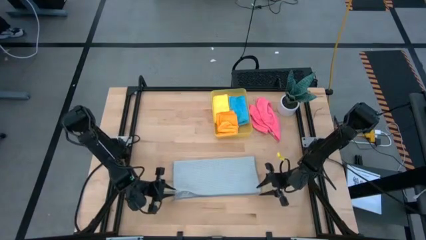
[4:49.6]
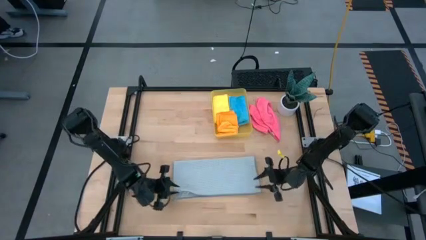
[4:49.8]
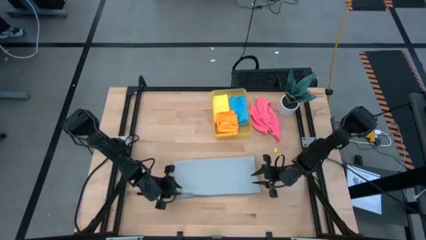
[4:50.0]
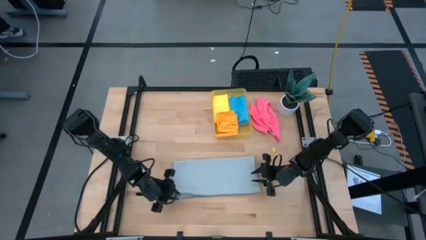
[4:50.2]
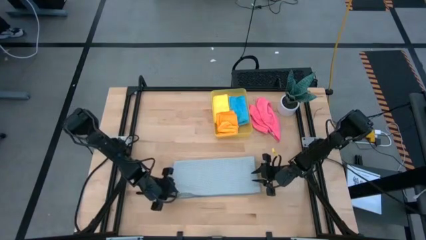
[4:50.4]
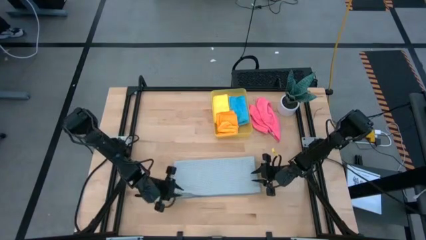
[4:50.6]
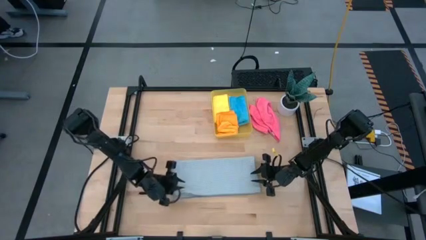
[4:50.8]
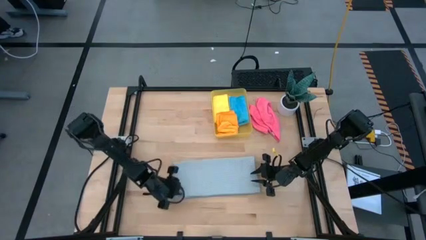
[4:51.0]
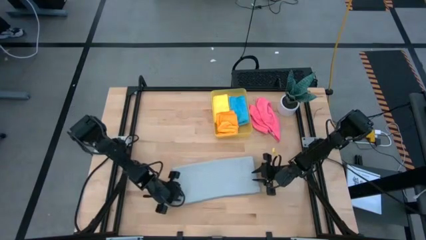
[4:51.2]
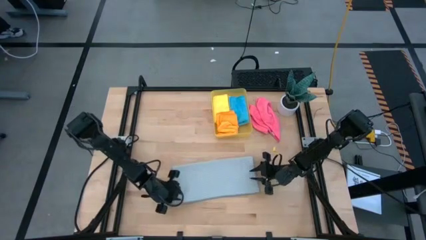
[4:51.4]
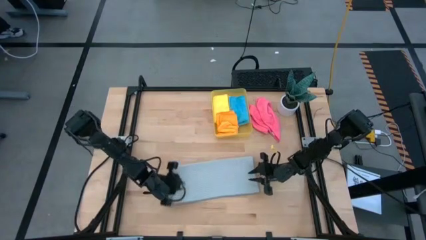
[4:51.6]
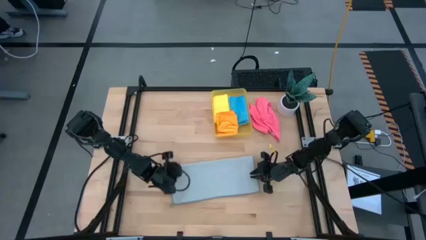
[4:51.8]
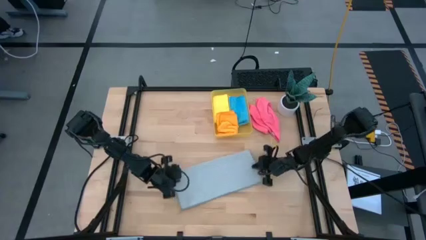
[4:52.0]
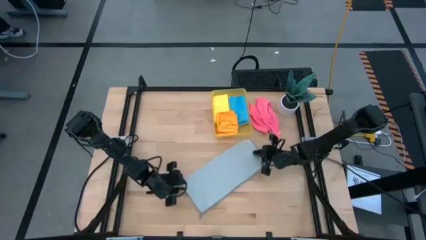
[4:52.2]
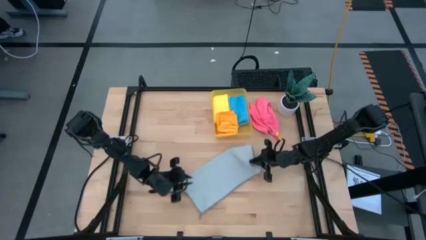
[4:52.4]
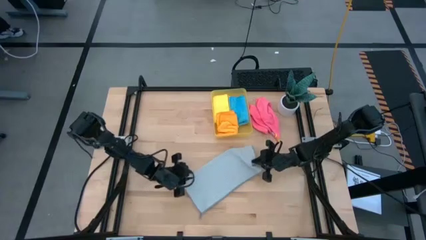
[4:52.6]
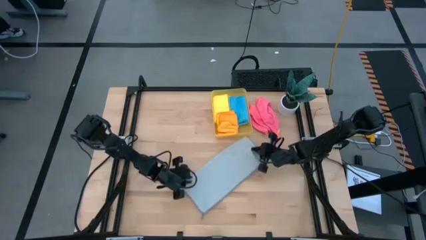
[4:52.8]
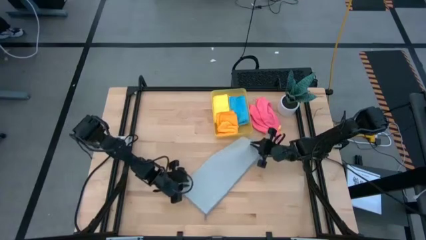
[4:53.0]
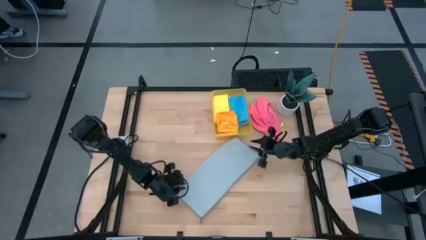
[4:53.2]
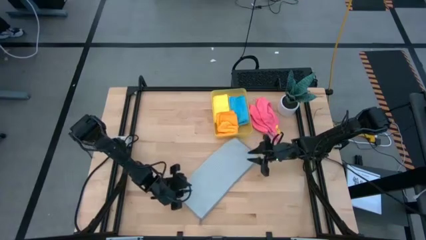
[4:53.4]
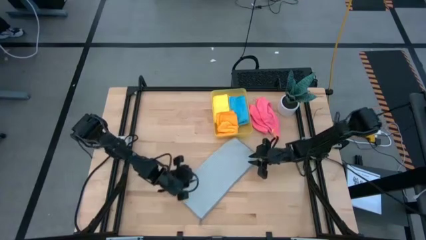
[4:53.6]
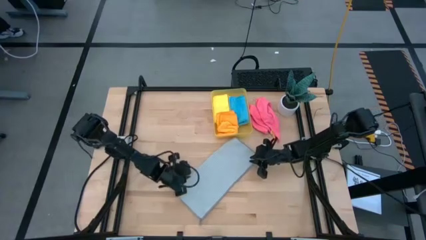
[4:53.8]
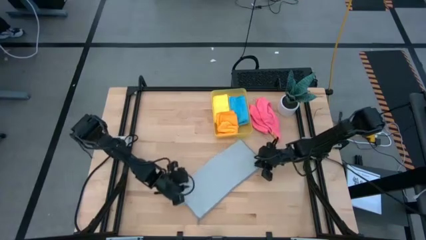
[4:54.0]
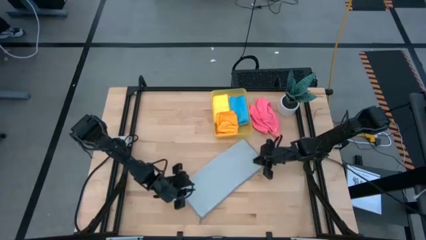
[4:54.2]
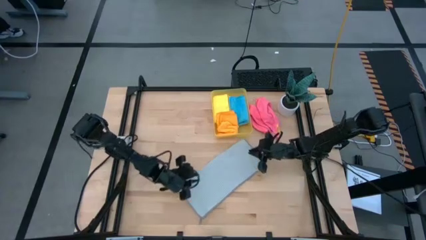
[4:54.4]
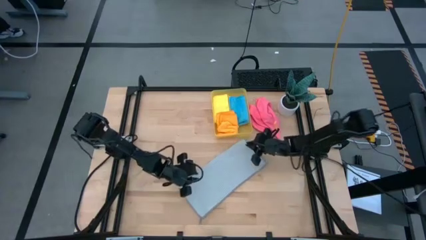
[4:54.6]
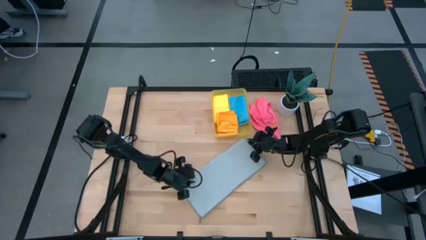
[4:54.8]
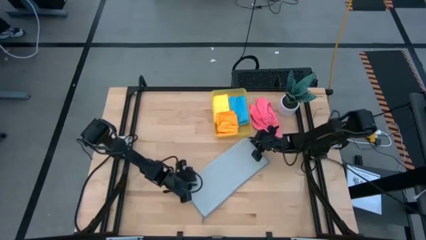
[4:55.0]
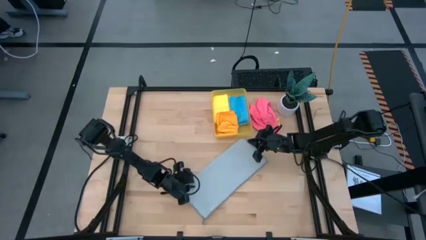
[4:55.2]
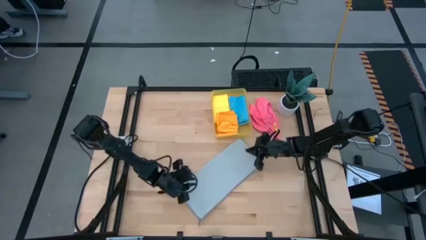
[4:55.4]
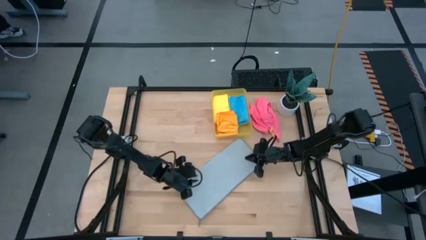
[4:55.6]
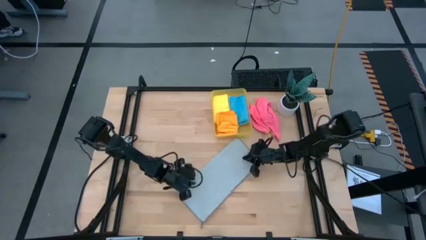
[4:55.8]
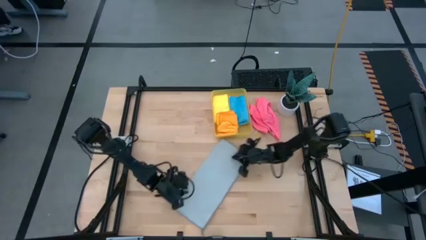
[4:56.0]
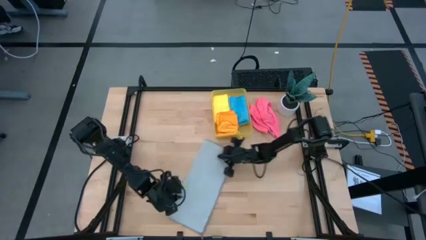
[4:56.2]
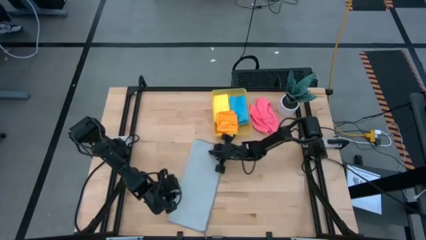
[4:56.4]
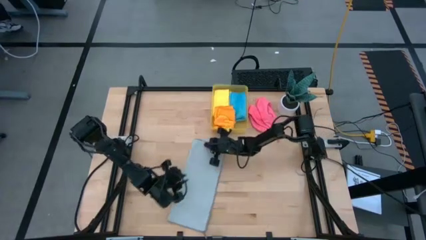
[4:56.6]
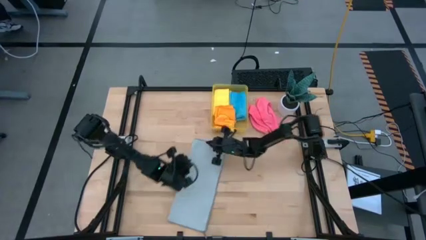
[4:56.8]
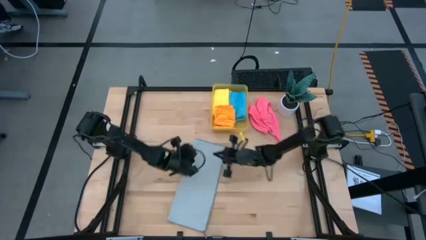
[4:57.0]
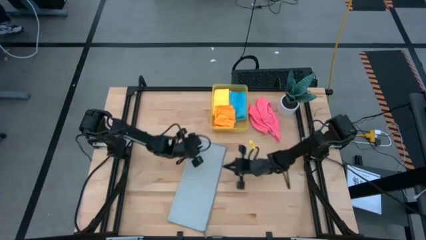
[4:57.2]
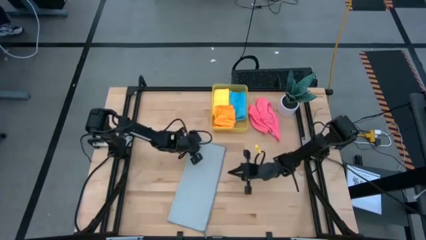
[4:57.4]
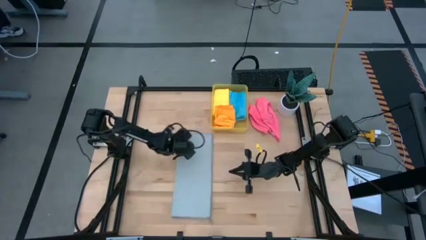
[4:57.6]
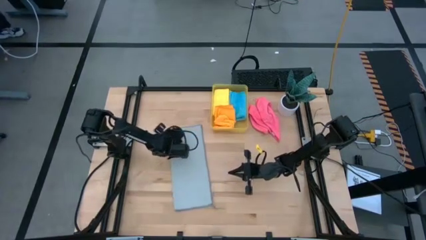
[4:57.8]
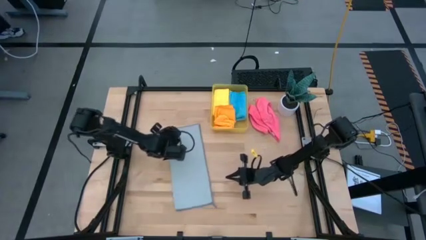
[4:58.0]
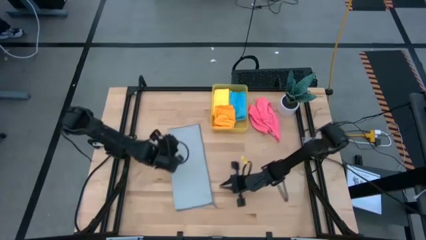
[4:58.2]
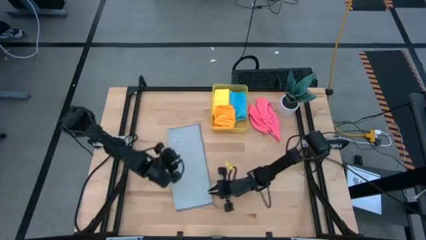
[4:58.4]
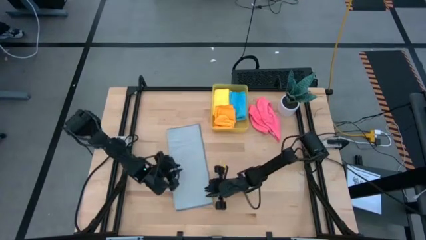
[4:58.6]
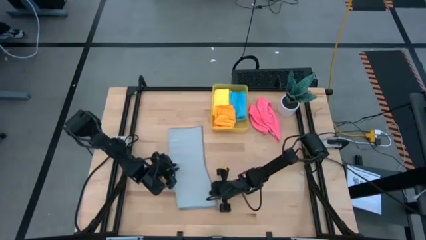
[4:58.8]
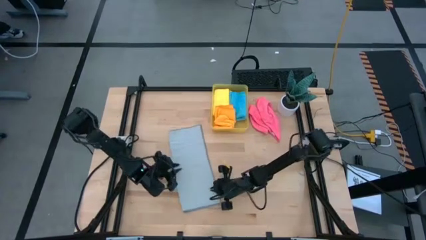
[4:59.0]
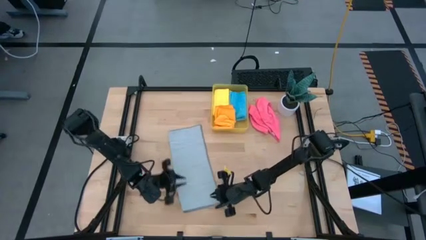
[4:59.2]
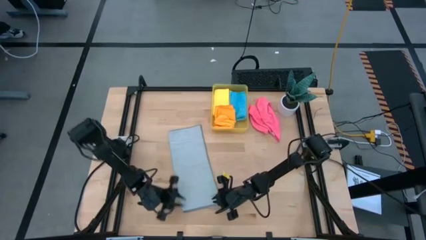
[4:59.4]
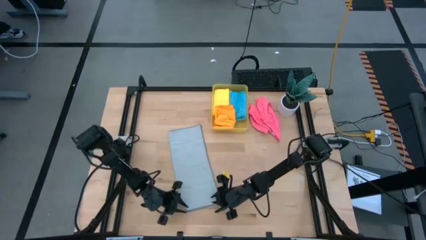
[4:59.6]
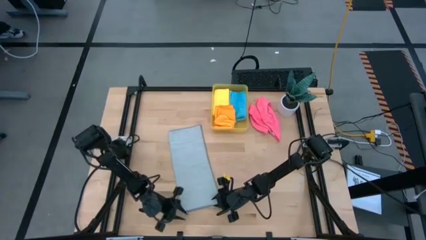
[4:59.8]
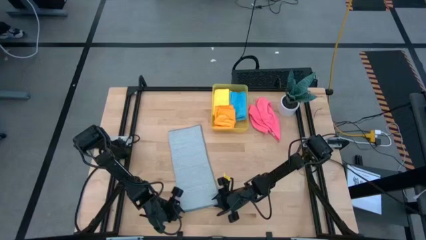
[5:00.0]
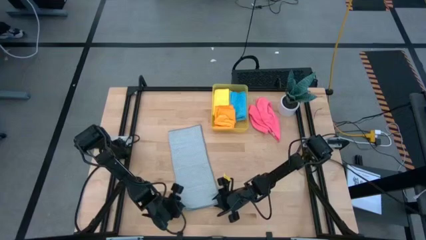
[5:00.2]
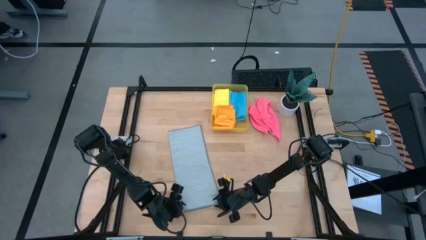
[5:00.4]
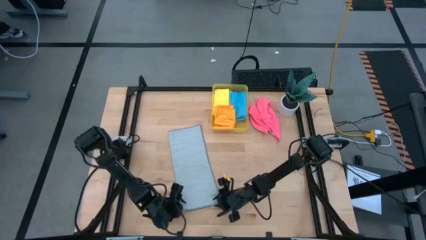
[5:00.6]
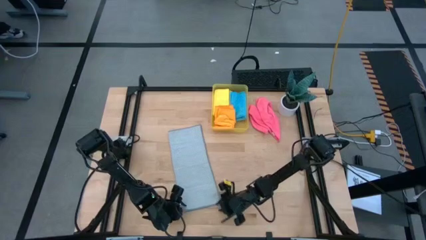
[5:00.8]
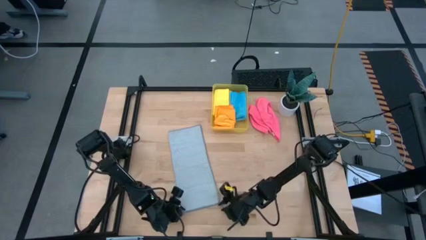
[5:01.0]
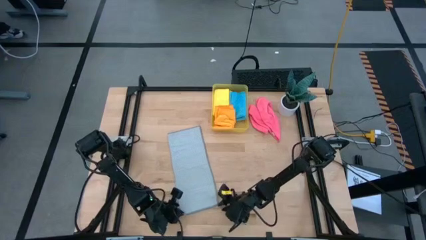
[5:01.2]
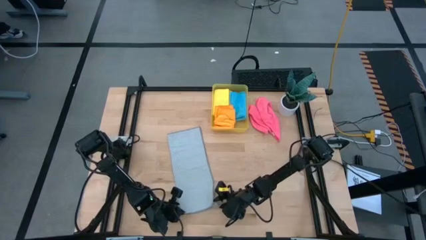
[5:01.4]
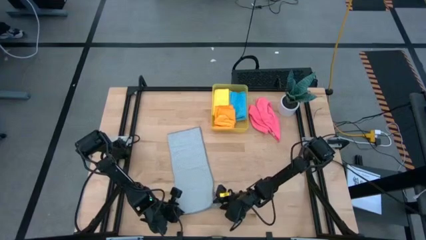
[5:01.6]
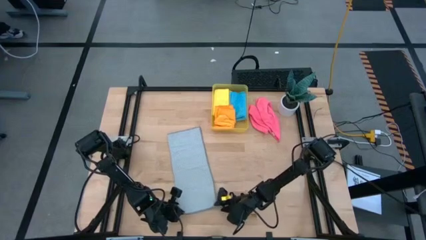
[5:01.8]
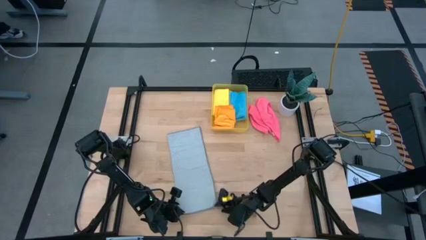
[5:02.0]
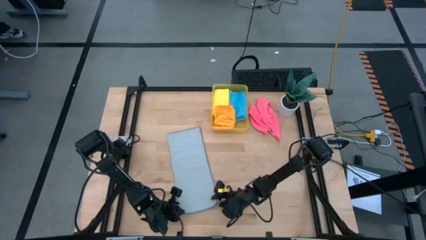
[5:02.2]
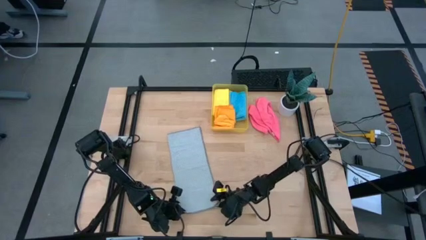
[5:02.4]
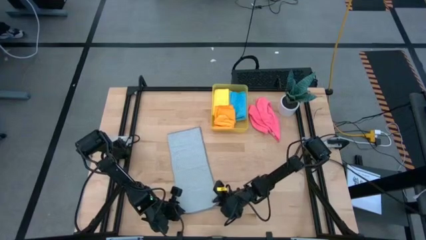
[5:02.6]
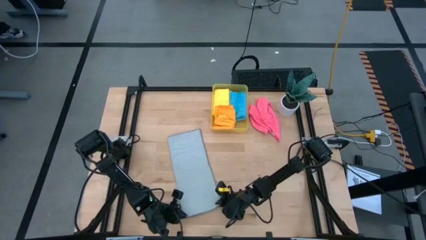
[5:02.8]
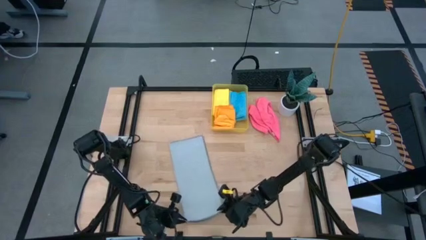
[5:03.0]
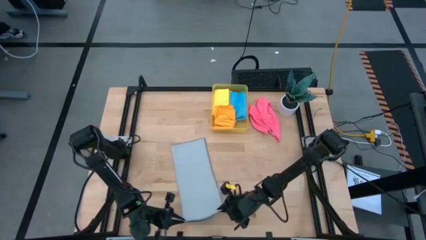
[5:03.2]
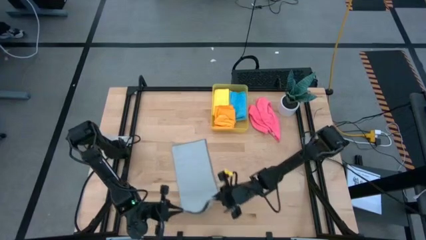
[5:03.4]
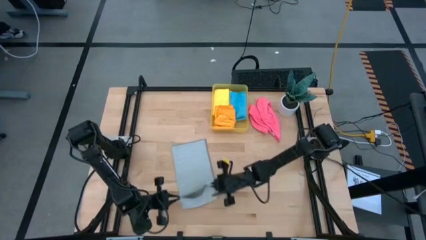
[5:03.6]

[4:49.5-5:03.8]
Task: Fold microfiber towels
Fold the gray microfiber towel

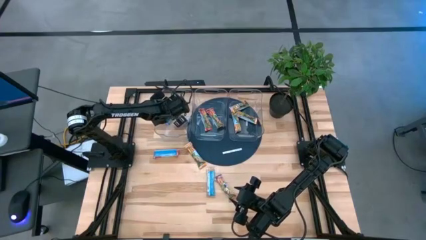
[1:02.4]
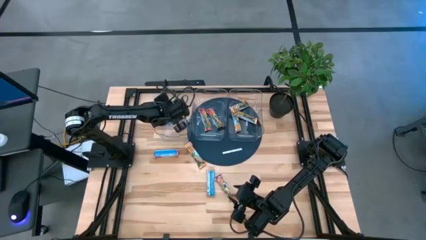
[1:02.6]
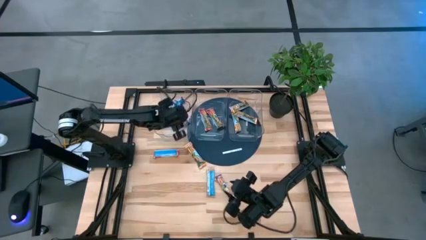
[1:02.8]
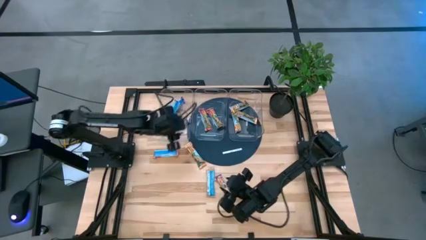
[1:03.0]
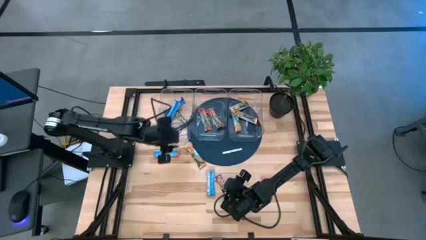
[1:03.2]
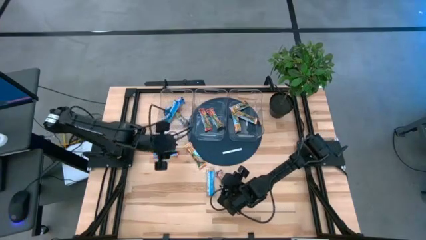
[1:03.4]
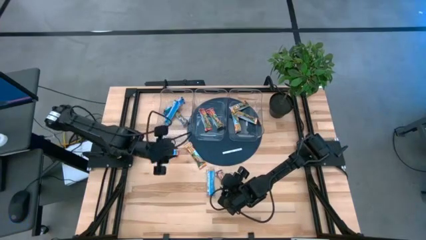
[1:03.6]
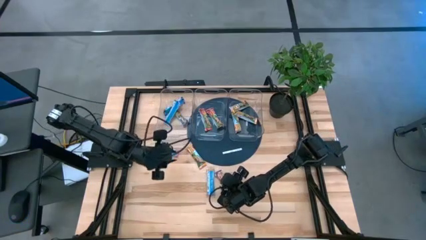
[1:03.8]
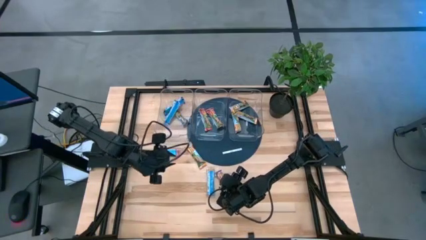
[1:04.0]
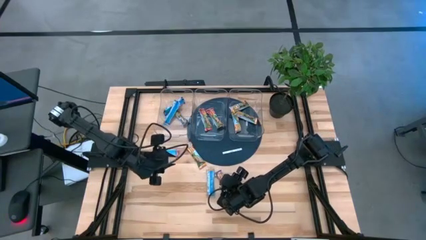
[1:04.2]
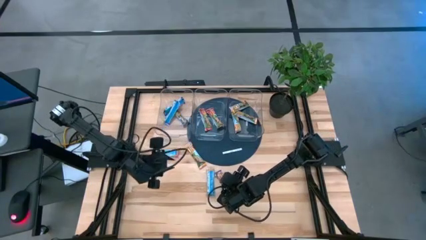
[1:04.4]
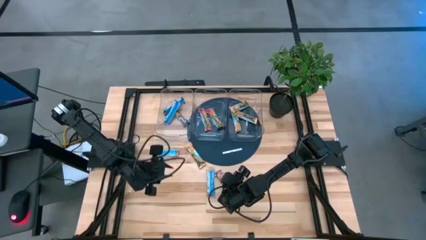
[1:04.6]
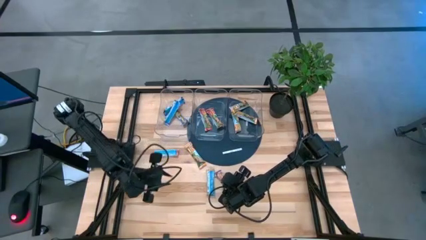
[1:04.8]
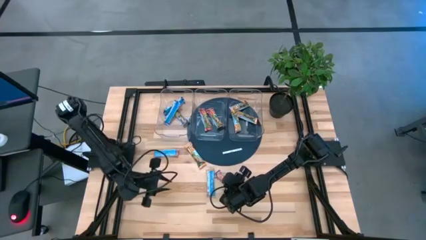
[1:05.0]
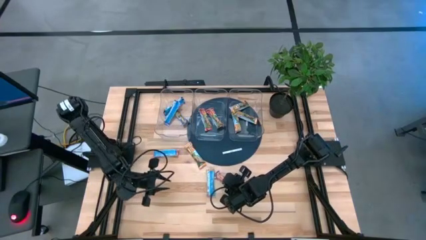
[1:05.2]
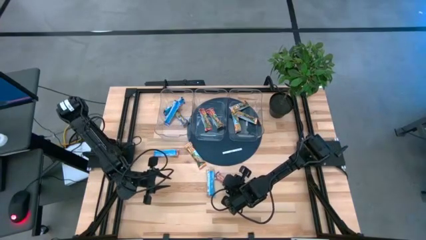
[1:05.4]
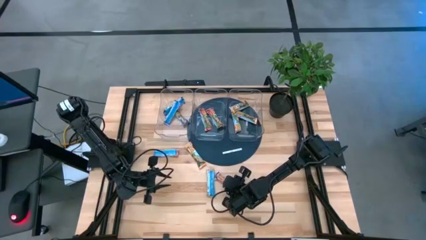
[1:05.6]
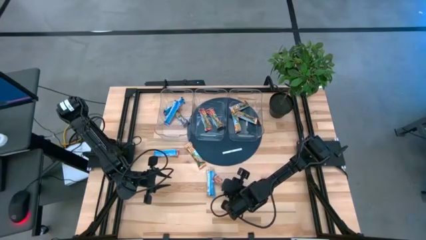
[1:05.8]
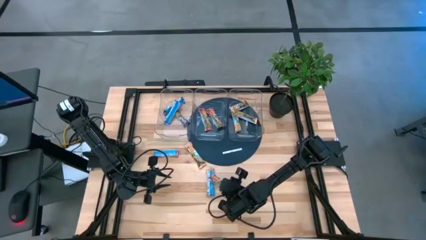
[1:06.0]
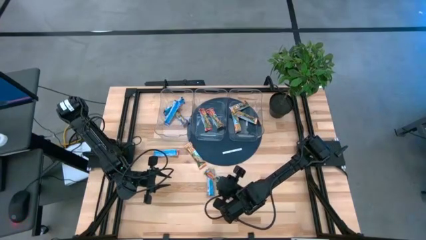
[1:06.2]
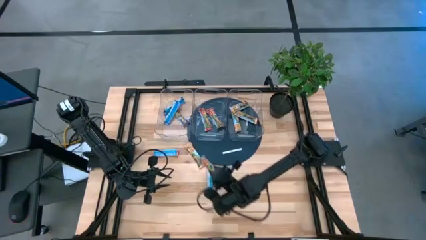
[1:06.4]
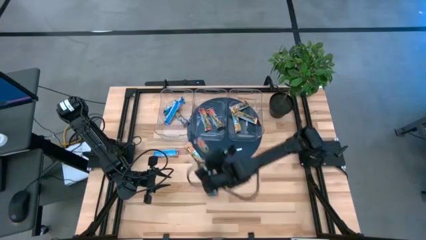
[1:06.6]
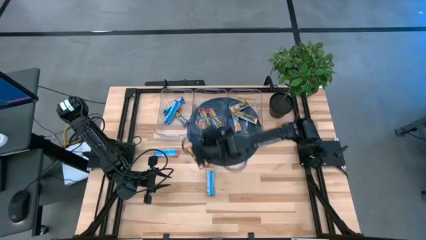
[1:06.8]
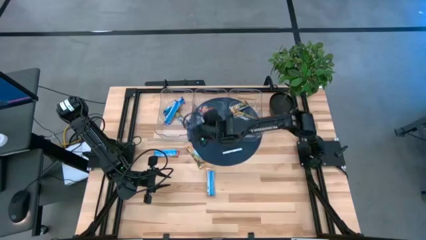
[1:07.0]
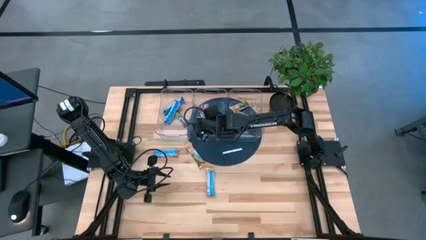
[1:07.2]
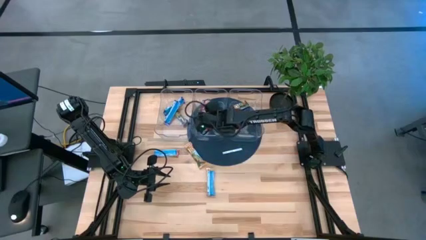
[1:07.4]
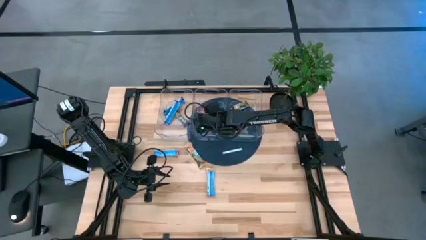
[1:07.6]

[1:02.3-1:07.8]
Task: Pick and place Granola Bars by type
Put the red granola bar into the middle transparent bin
